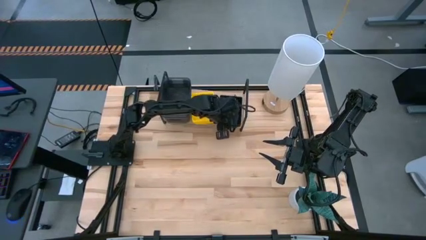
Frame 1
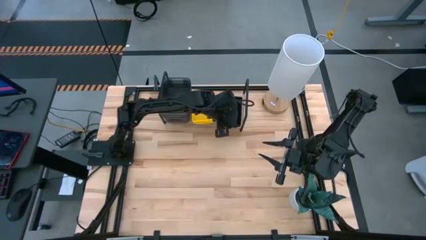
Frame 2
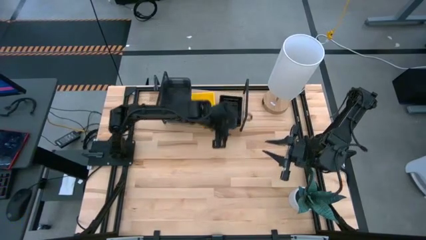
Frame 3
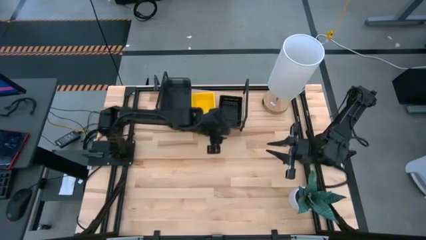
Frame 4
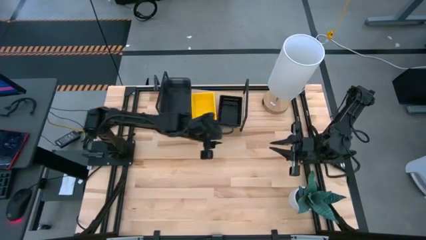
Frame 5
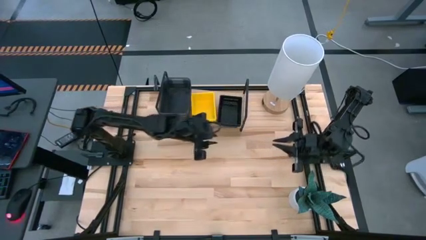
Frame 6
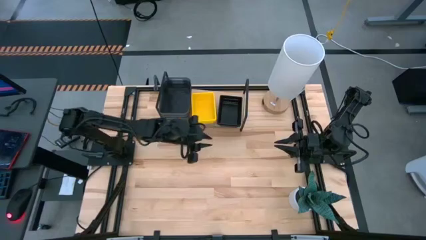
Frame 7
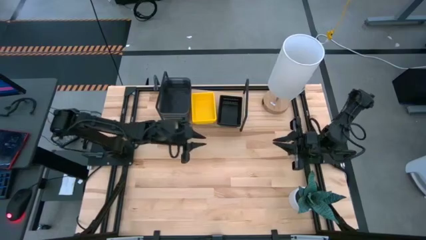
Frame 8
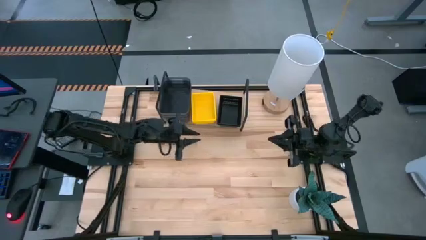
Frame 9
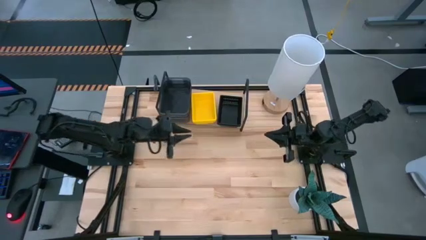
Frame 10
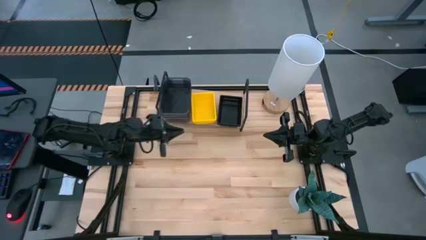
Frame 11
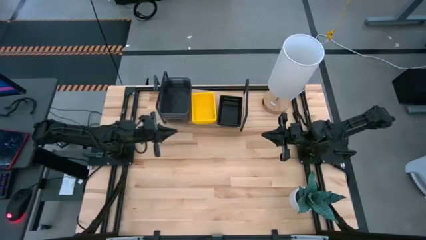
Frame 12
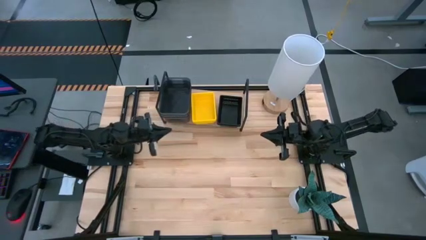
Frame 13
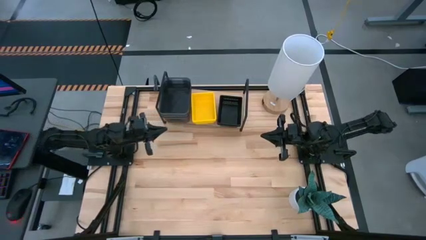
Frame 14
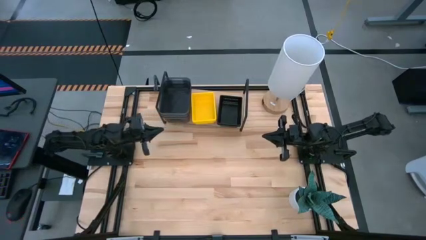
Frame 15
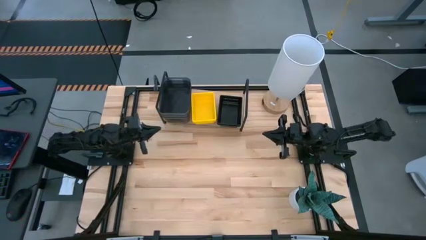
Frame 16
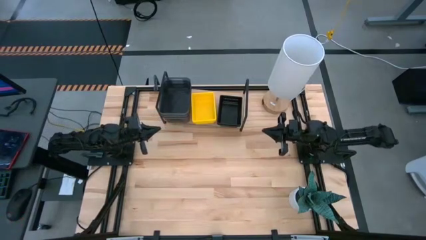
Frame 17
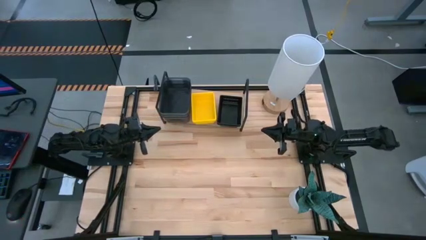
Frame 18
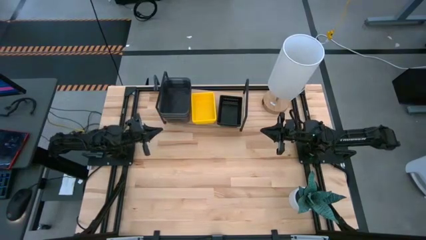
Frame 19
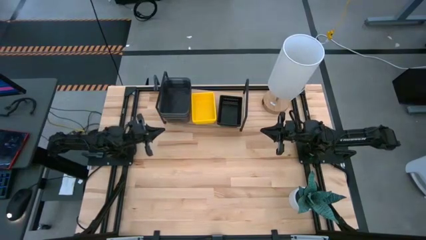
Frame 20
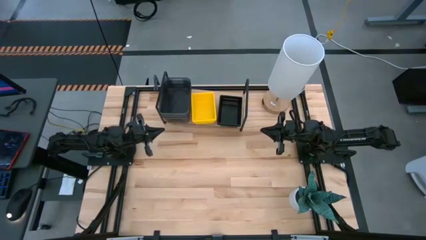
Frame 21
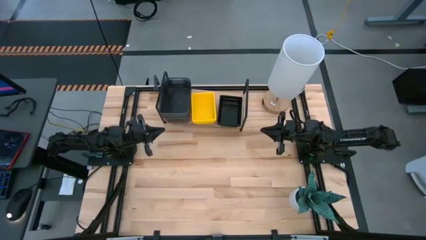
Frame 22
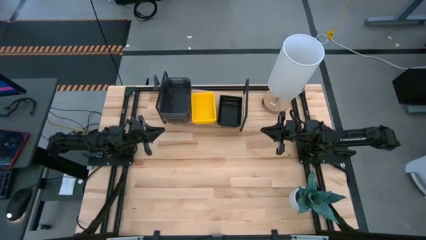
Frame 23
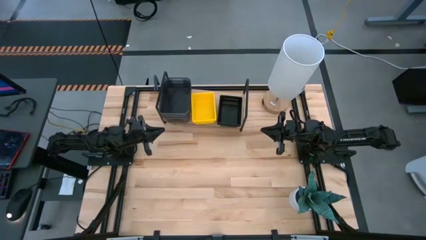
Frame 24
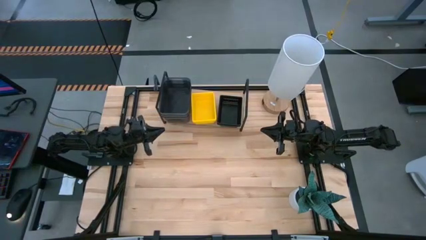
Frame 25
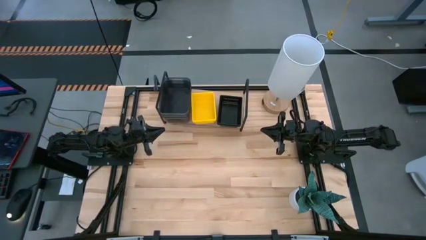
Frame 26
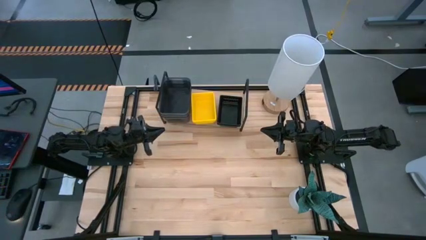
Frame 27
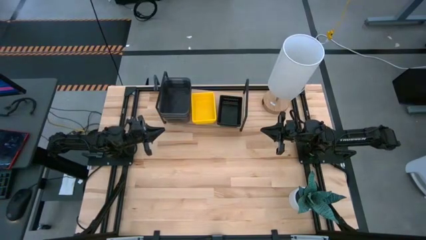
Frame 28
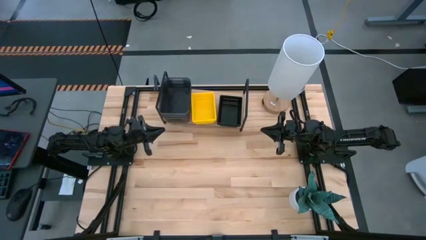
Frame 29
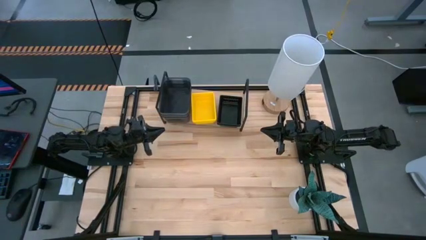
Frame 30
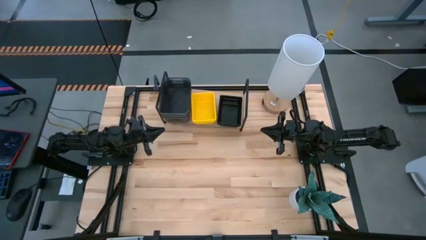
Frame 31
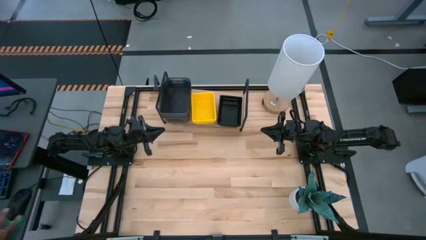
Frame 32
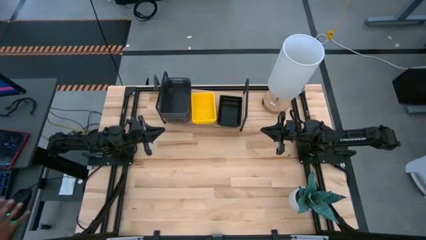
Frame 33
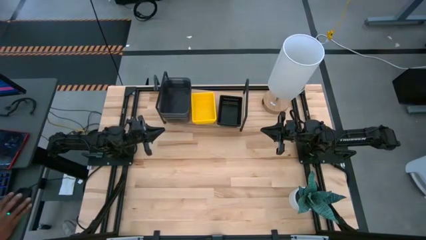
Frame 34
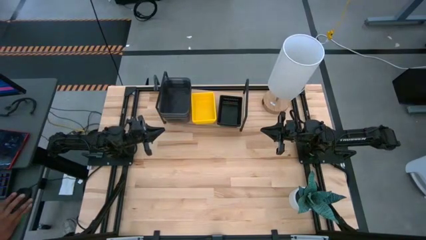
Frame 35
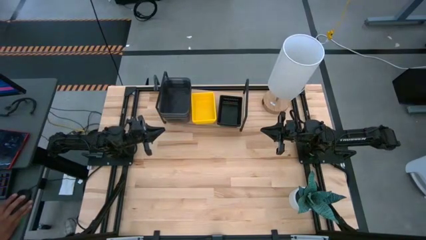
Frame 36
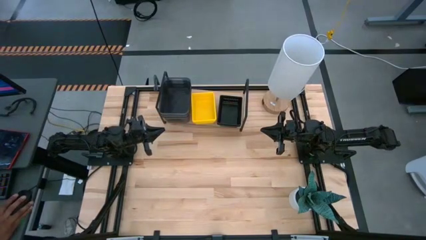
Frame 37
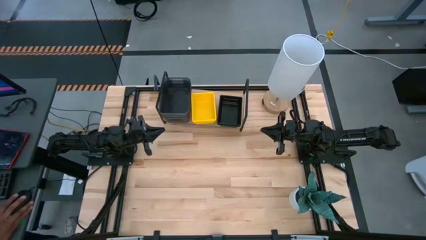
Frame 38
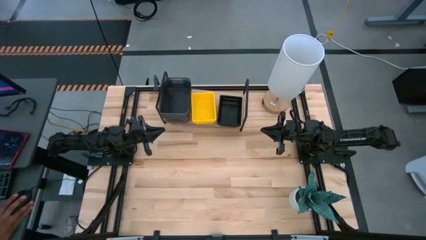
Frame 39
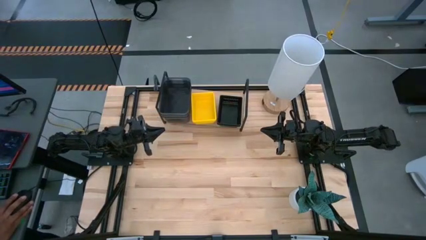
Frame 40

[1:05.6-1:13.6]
Task: Stack baskets on shelf by color
Return to Home Position

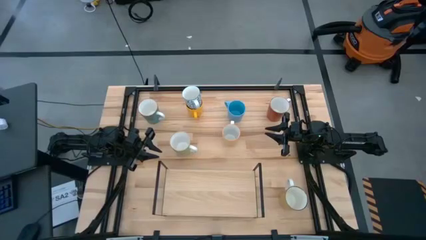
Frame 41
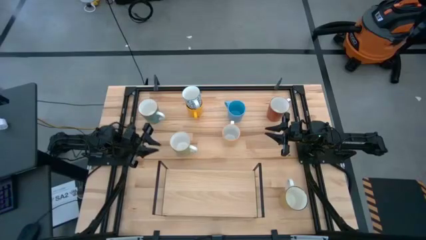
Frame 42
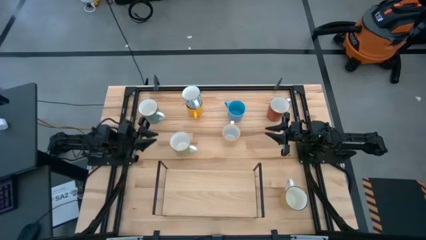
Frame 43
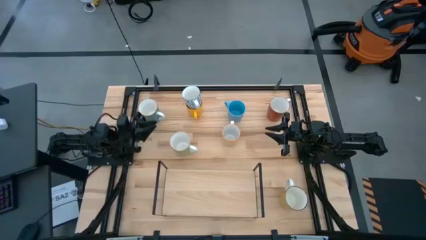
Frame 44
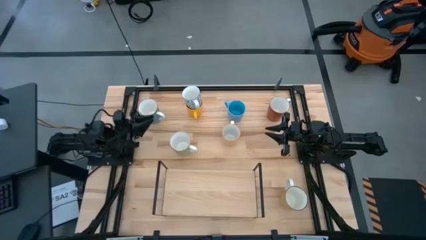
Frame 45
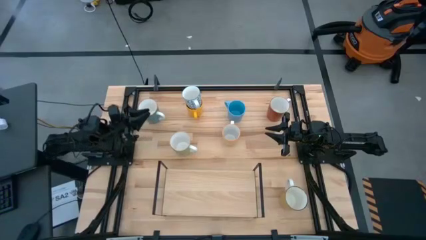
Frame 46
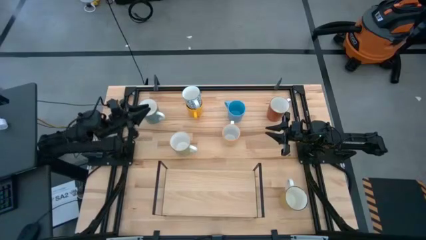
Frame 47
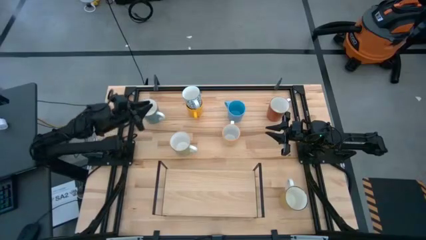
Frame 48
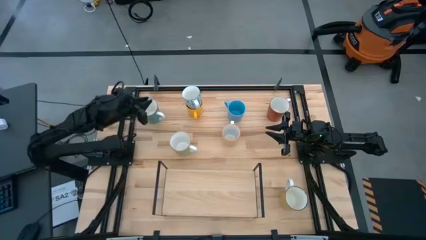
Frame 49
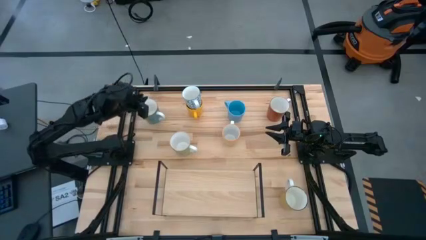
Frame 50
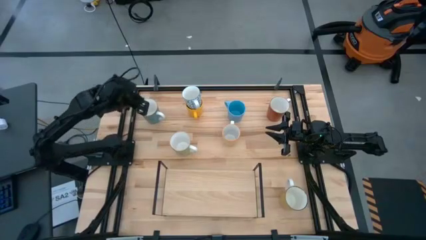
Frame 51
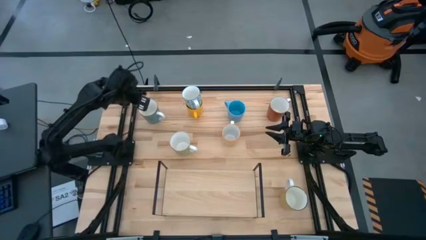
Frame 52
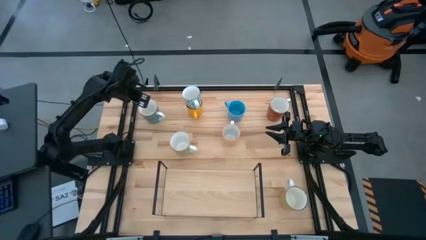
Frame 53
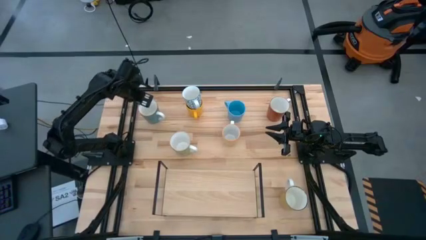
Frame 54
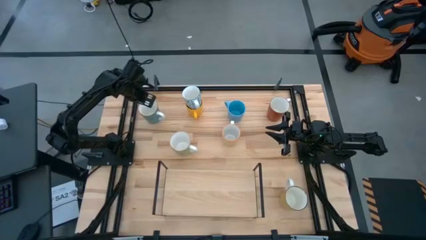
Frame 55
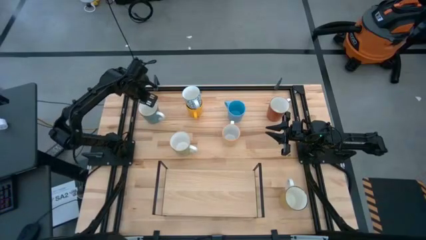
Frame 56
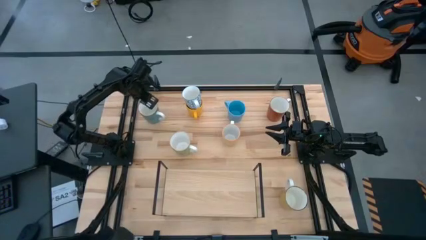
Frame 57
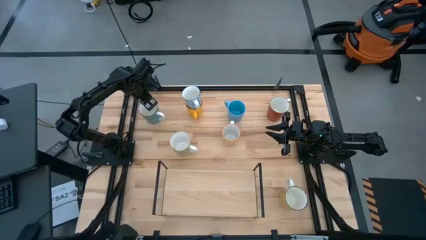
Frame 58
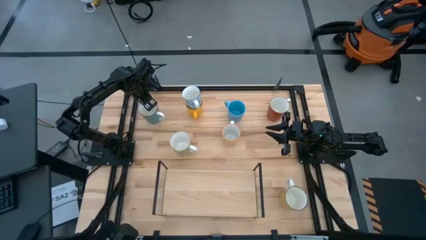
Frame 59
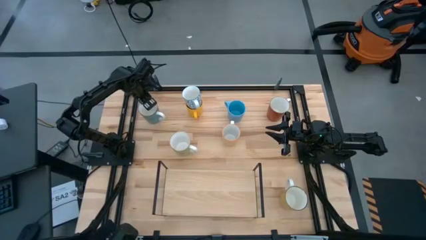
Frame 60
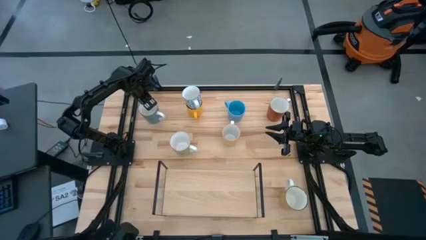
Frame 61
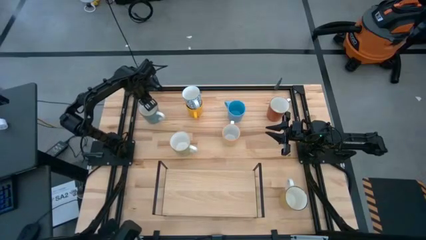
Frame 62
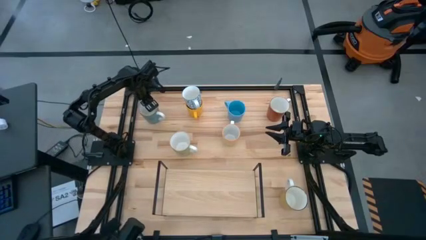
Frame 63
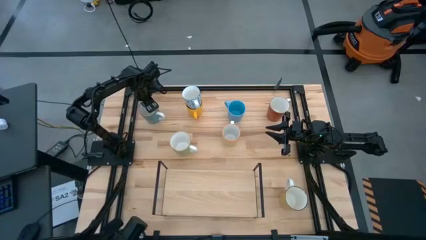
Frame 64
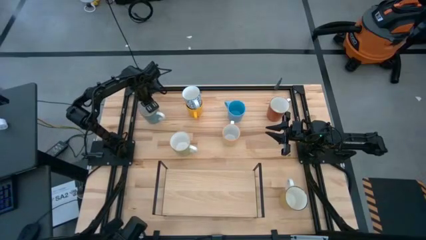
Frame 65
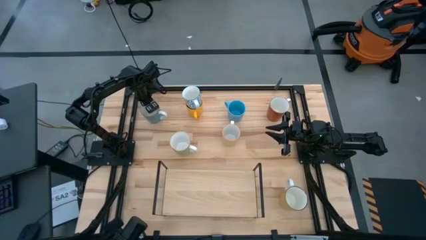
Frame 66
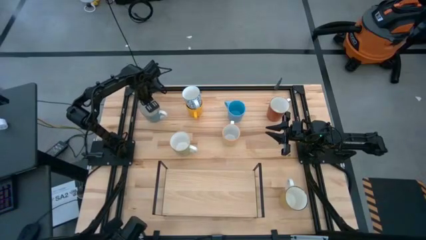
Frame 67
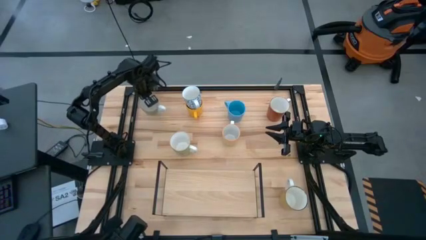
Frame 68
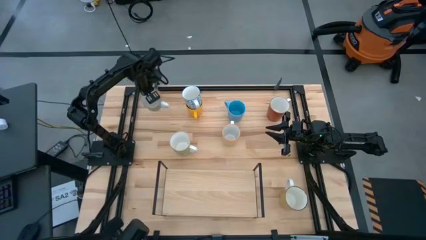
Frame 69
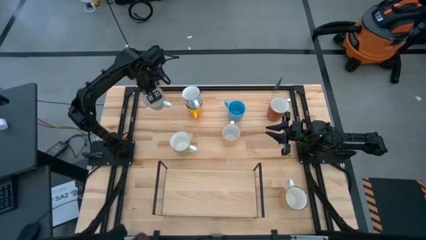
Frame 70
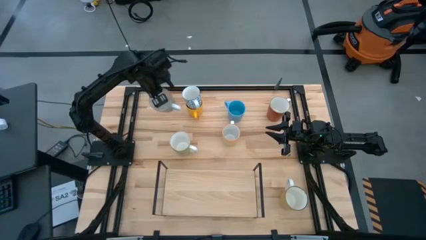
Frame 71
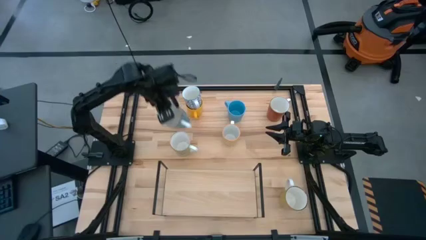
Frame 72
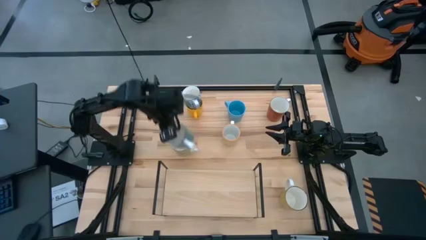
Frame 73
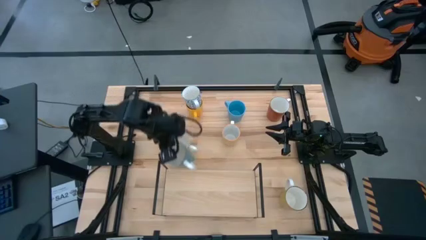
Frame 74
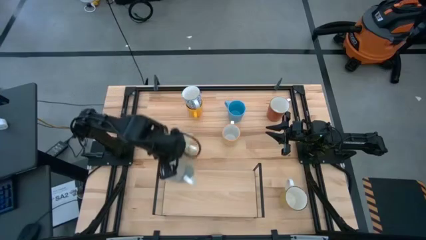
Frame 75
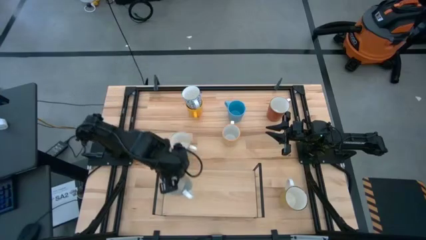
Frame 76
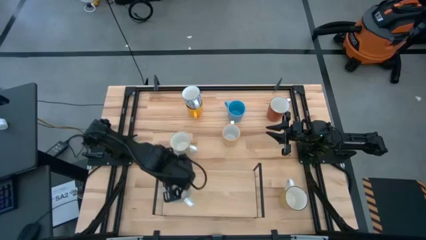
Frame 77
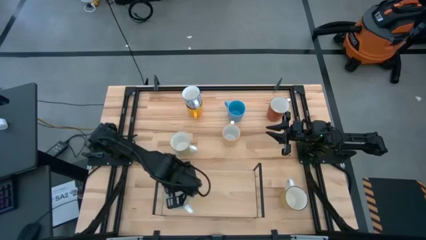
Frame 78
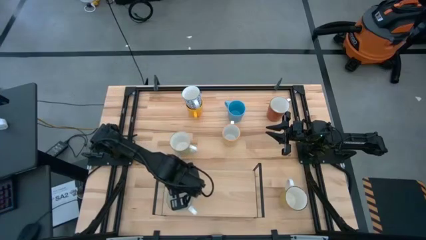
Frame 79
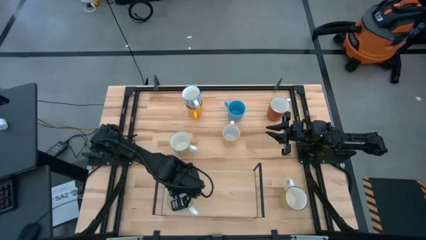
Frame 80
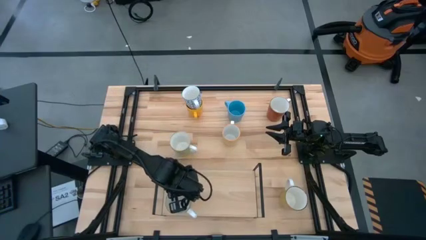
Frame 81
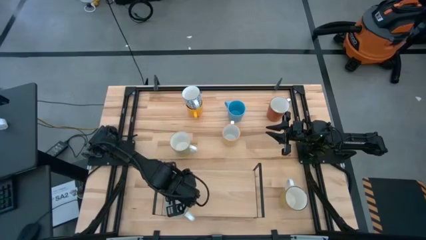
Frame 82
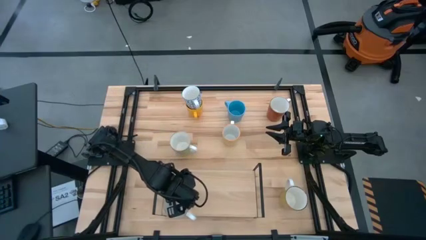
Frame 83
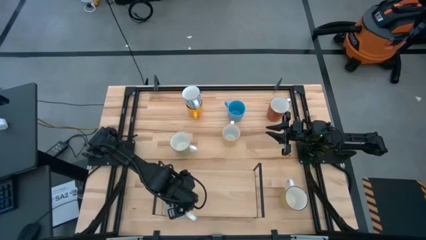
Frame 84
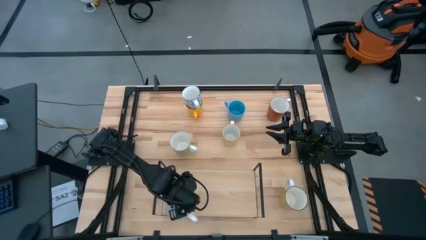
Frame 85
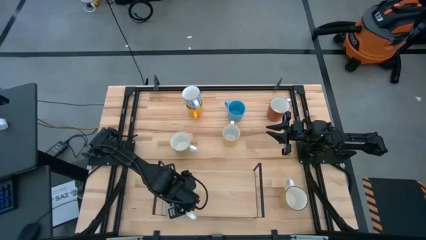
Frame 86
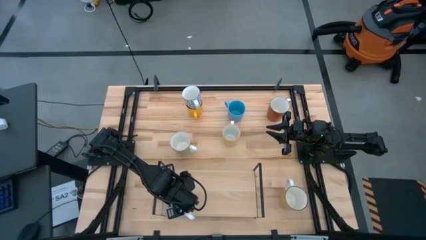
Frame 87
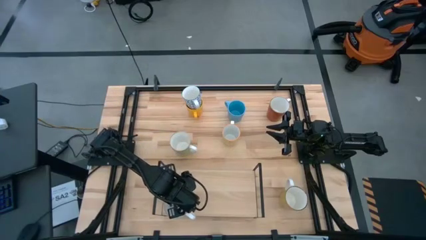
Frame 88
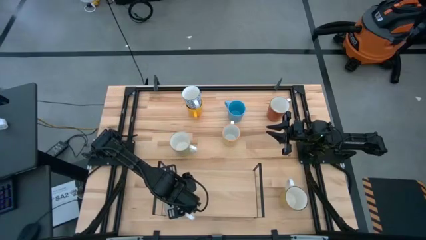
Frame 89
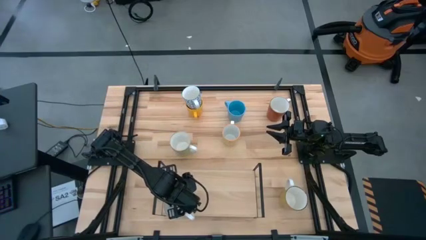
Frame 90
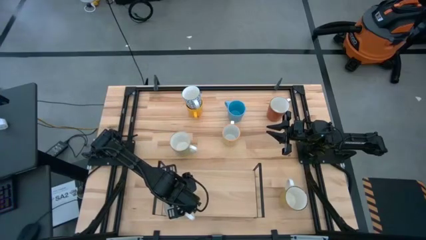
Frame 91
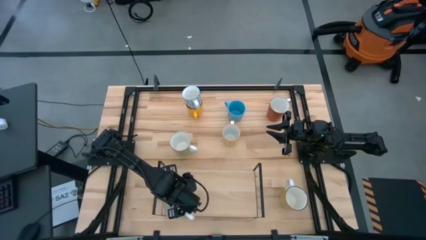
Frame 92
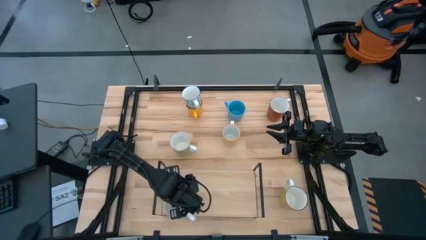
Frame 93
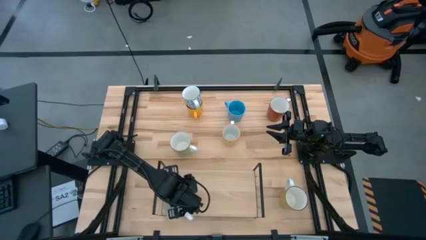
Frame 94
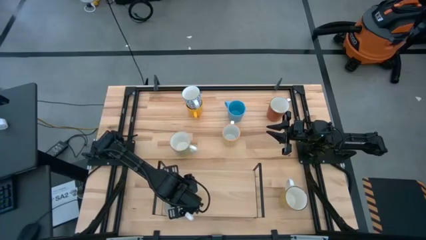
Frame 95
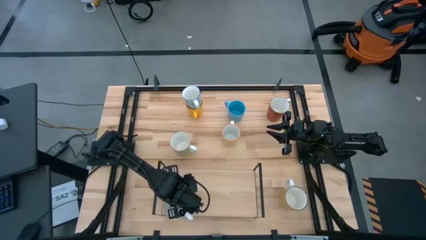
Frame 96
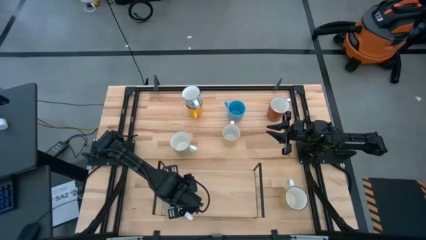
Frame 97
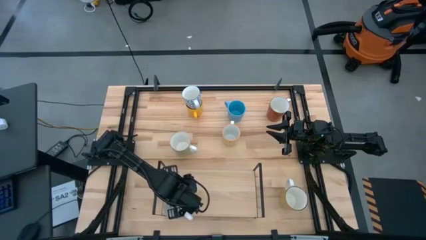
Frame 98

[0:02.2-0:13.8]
Task: Place coffee mugs
Put the light blue mug on the shelf
